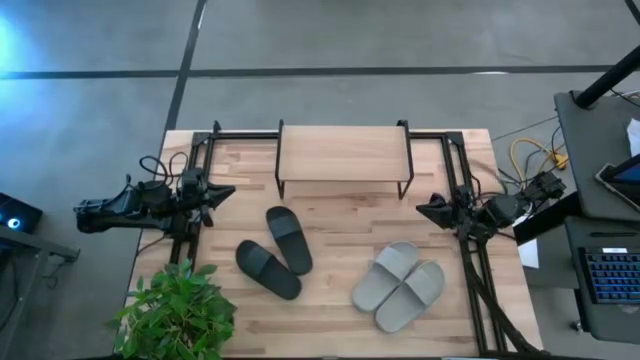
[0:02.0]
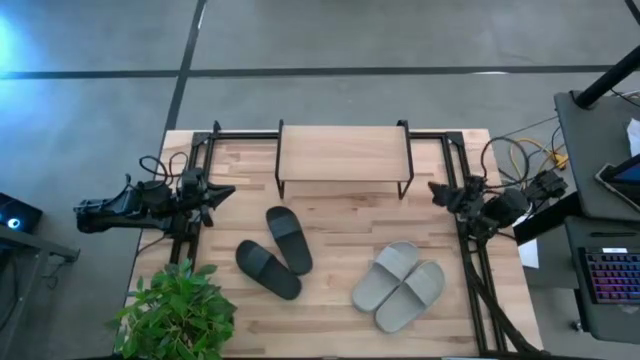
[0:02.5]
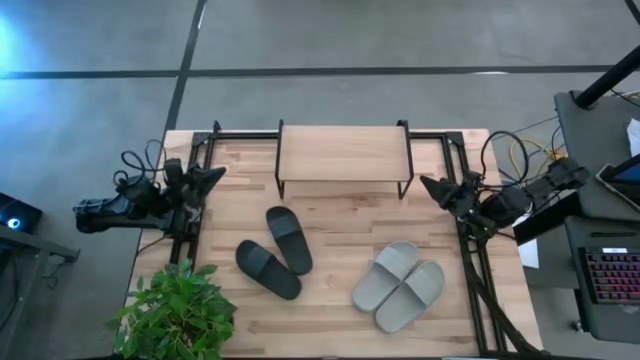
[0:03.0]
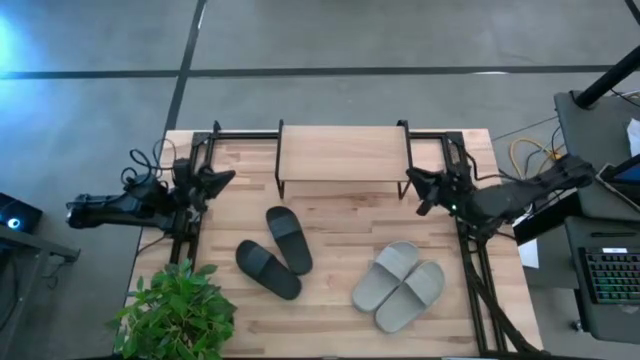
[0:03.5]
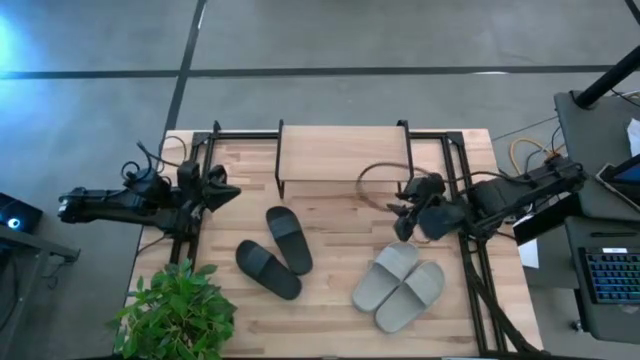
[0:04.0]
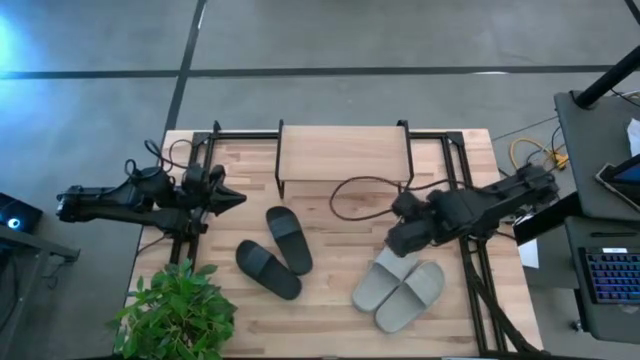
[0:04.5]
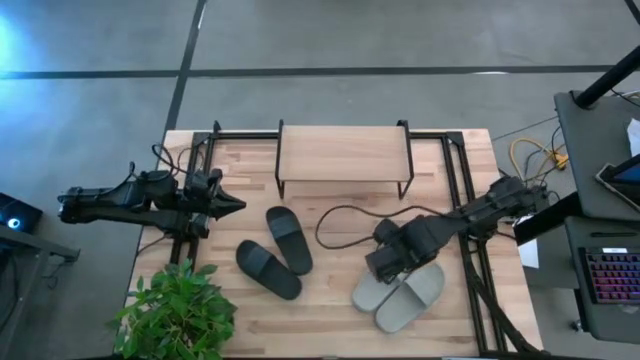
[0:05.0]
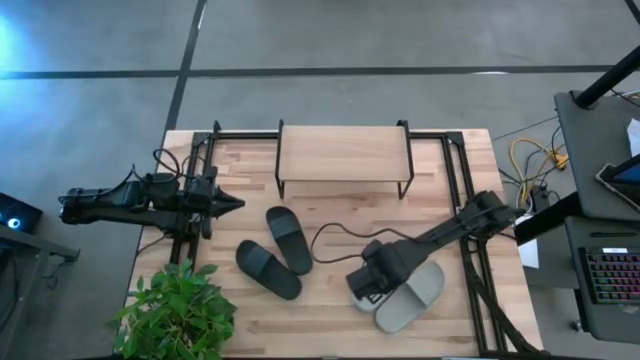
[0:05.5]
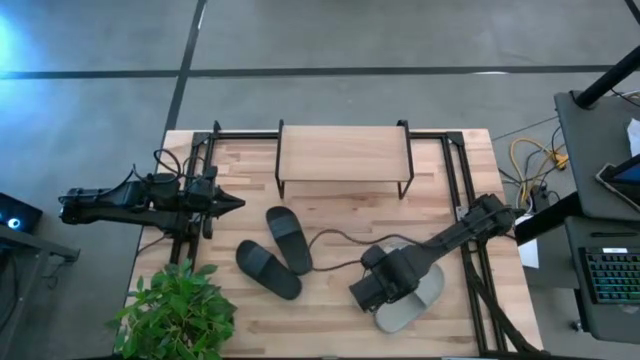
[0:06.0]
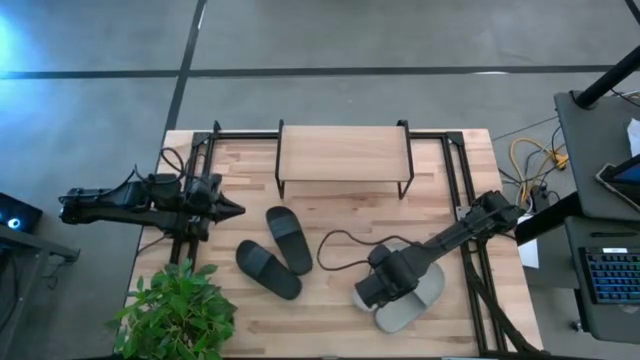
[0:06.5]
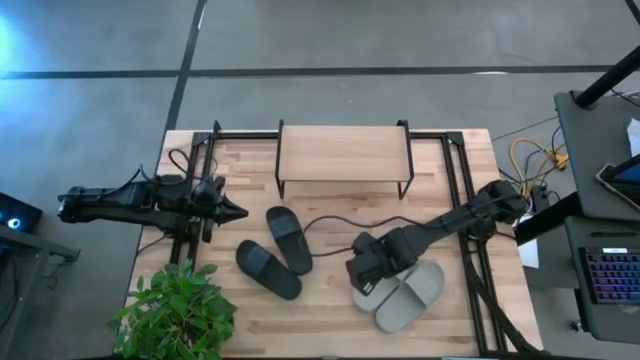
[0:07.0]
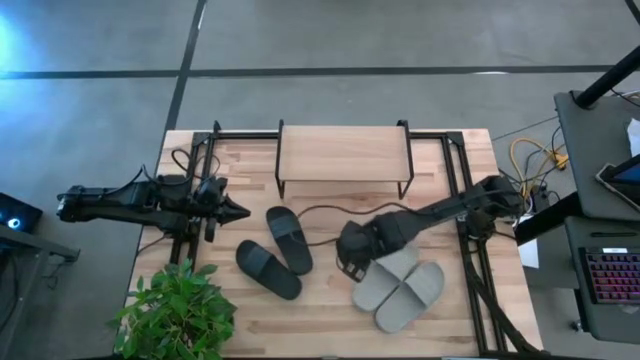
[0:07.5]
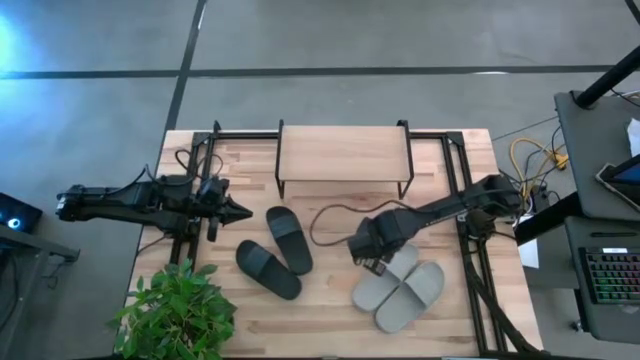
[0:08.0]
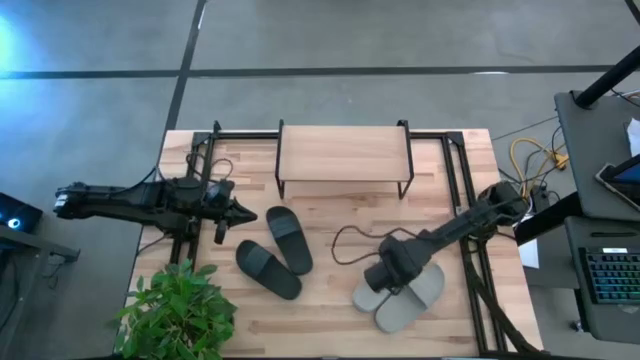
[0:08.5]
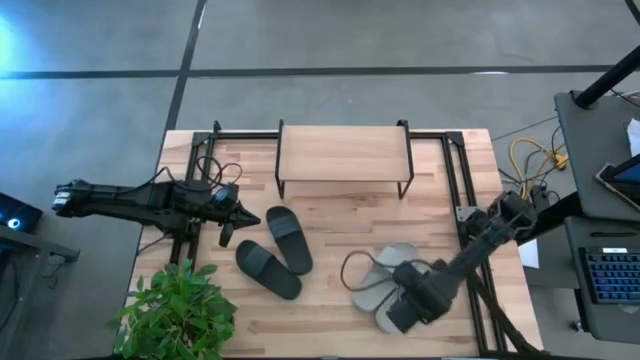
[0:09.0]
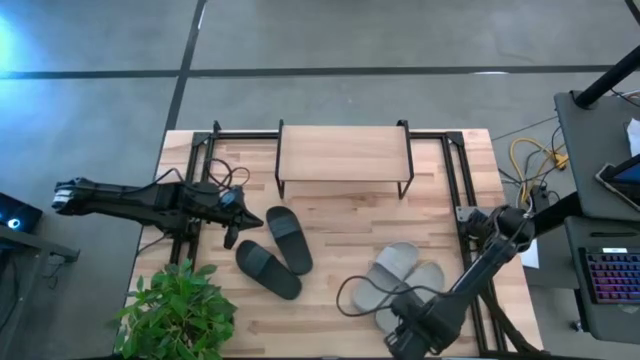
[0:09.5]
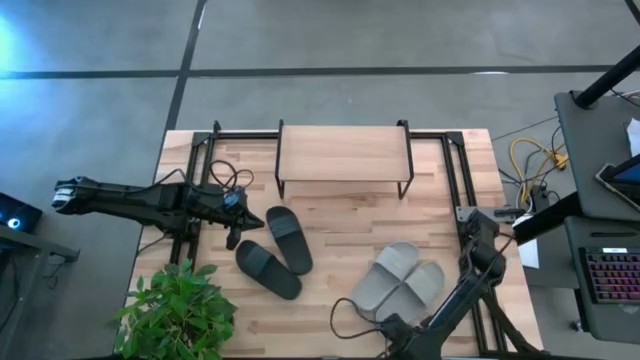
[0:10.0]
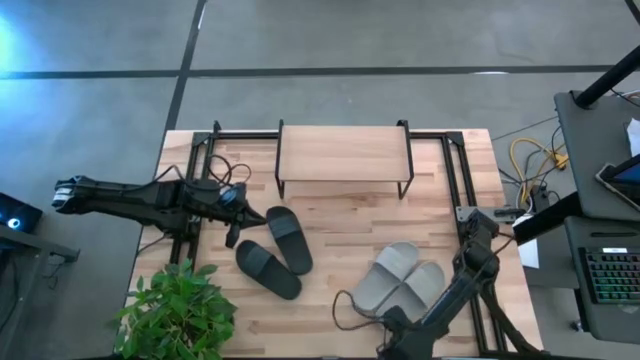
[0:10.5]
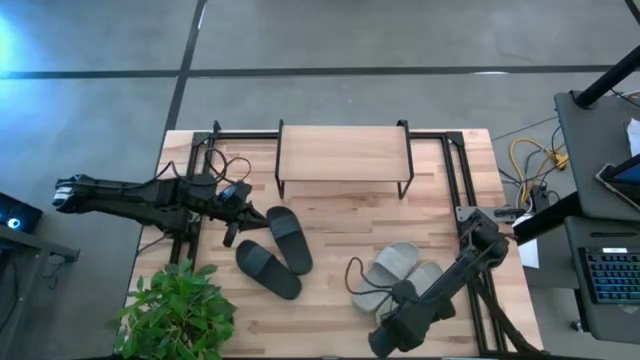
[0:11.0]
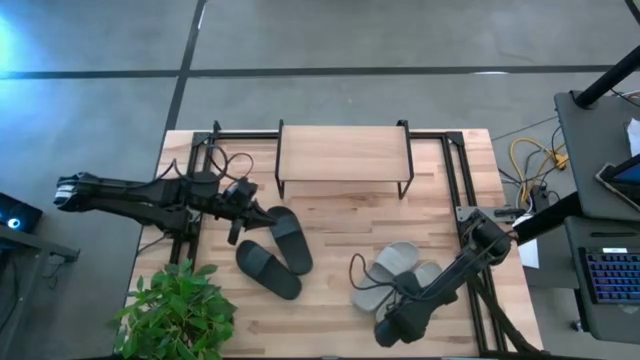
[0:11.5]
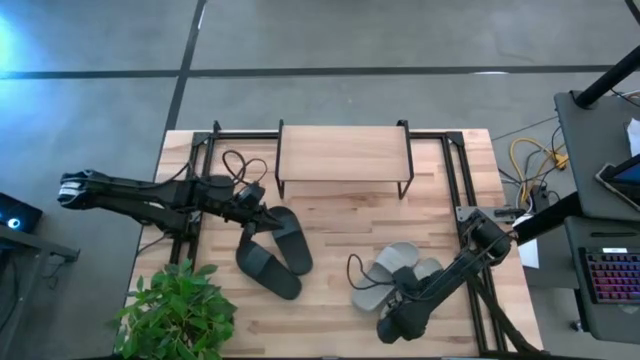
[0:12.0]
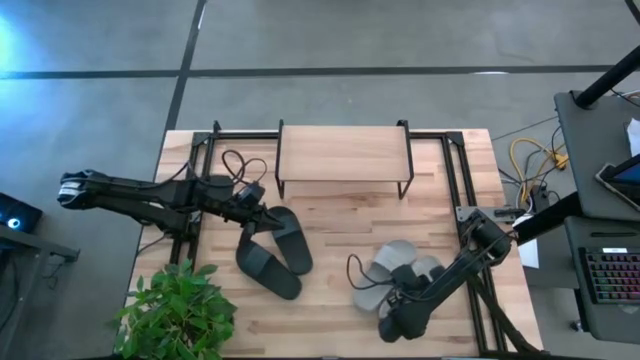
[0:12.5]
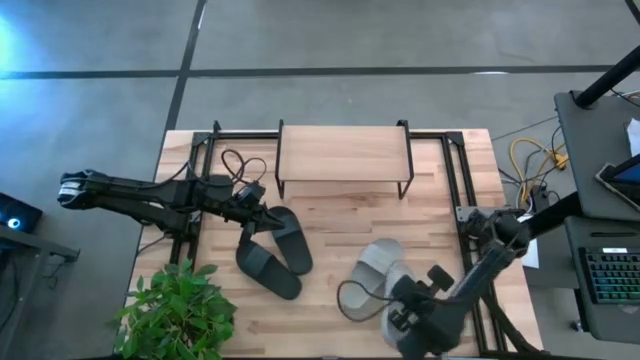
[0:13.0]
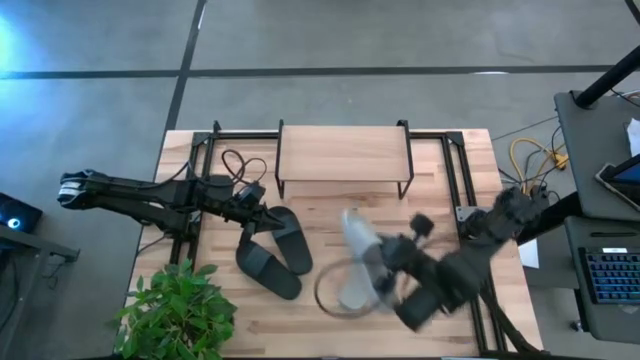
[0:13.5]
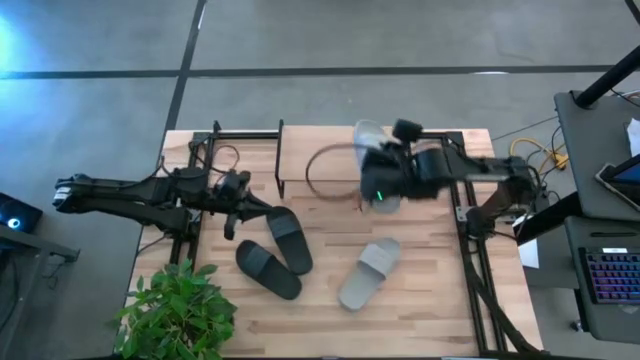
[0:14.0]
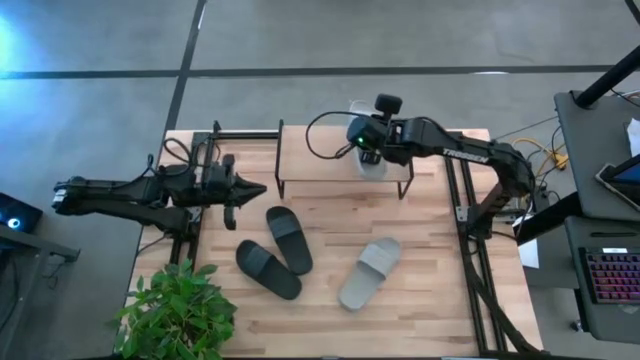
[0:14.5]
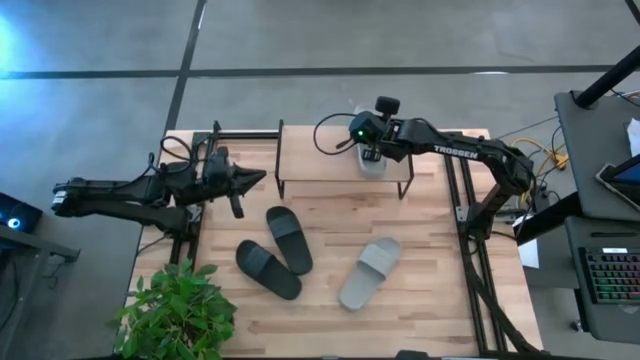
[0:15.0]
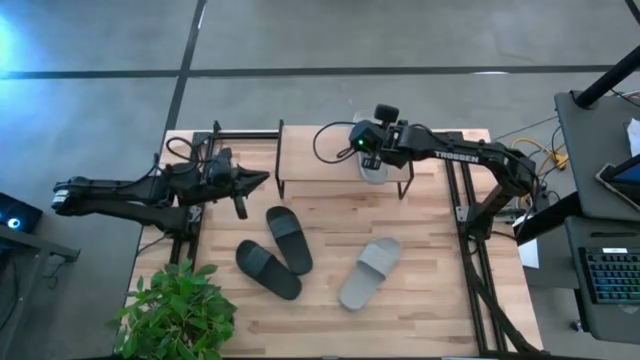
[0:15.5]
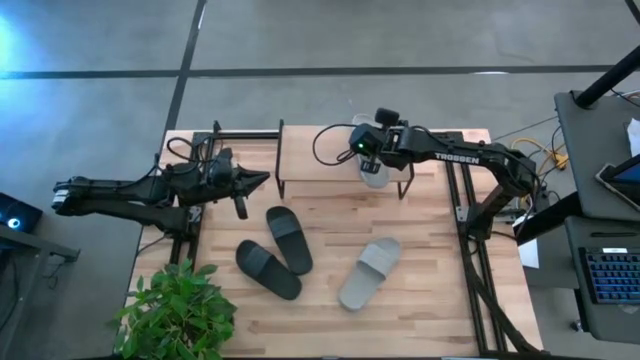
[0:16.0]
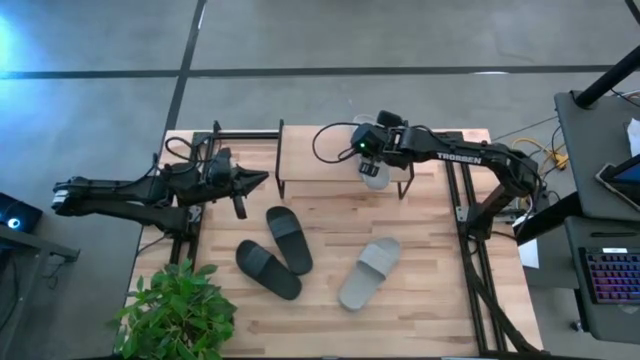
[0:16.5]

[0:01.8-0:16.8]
Task: Pick and place slides into the shelf
Put the right gray slide on the shelf

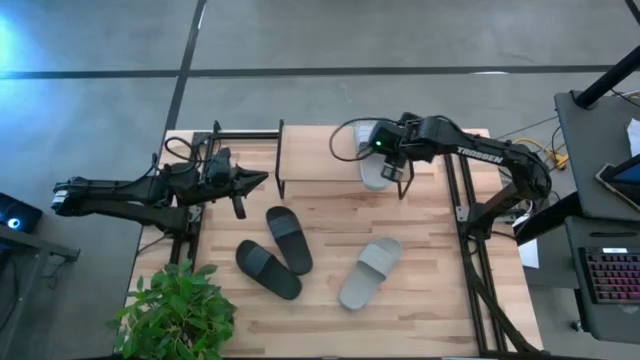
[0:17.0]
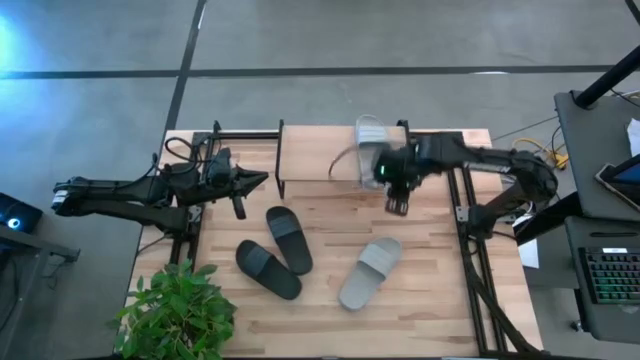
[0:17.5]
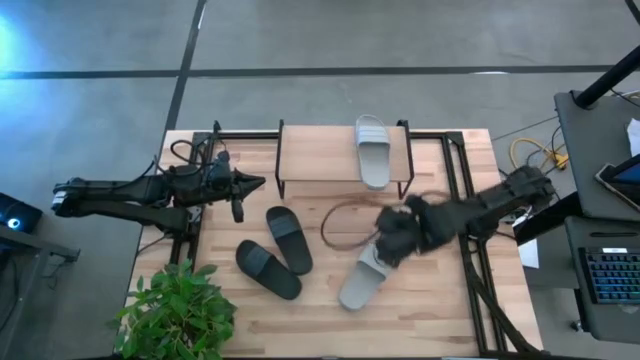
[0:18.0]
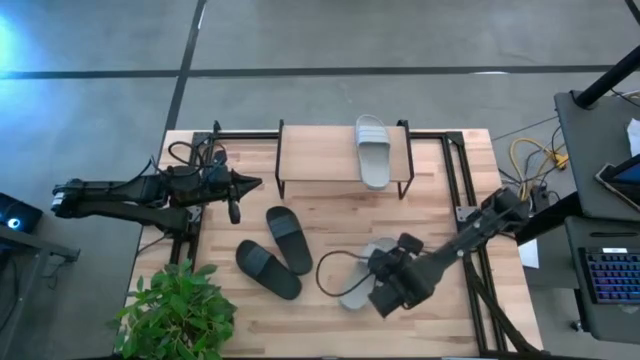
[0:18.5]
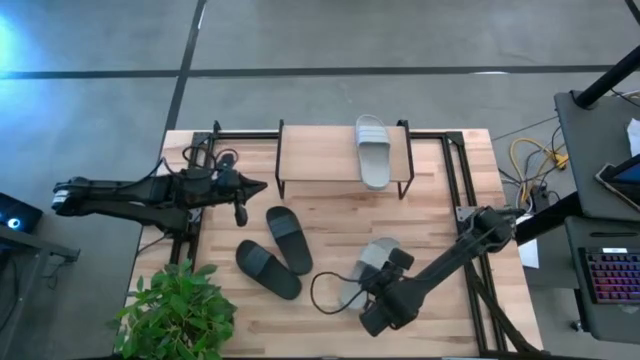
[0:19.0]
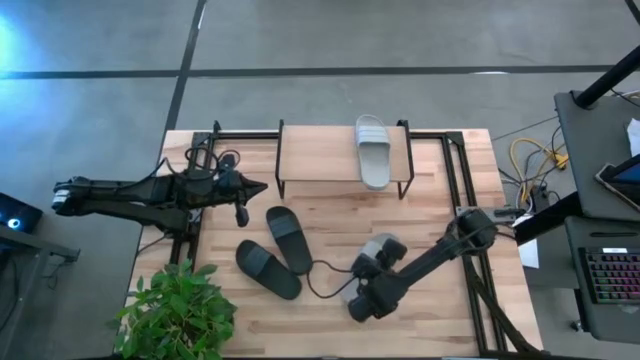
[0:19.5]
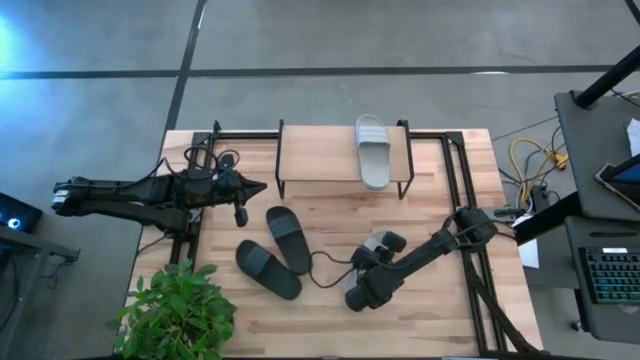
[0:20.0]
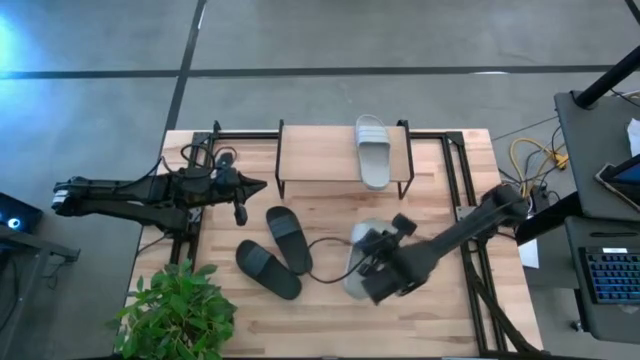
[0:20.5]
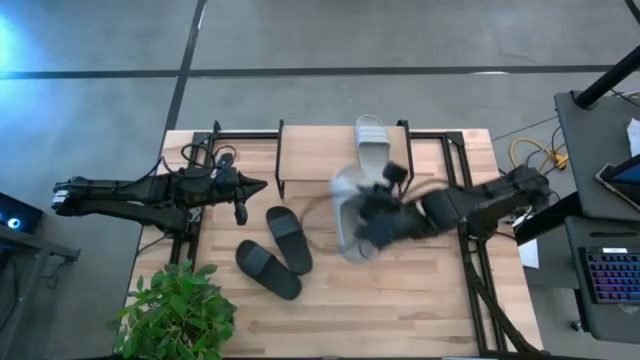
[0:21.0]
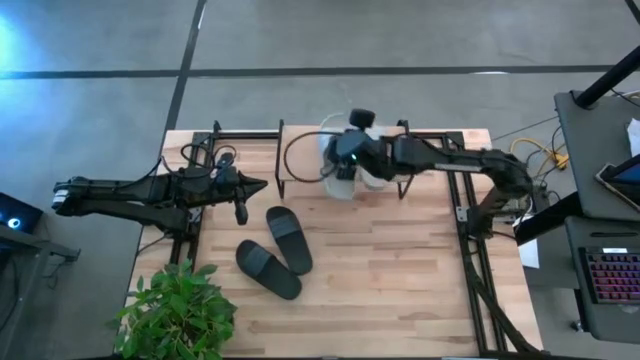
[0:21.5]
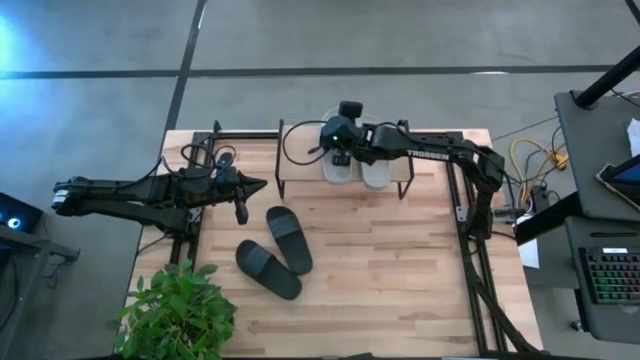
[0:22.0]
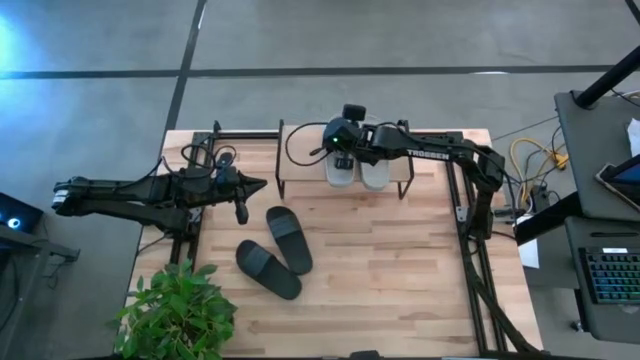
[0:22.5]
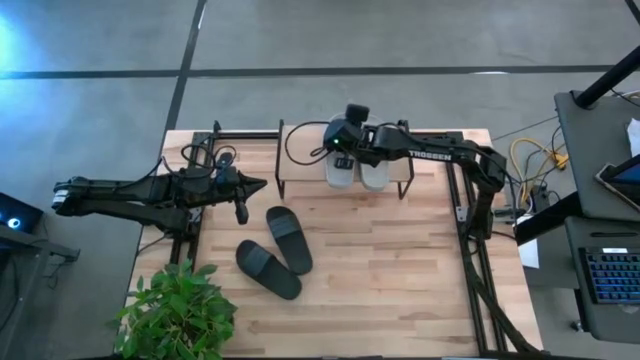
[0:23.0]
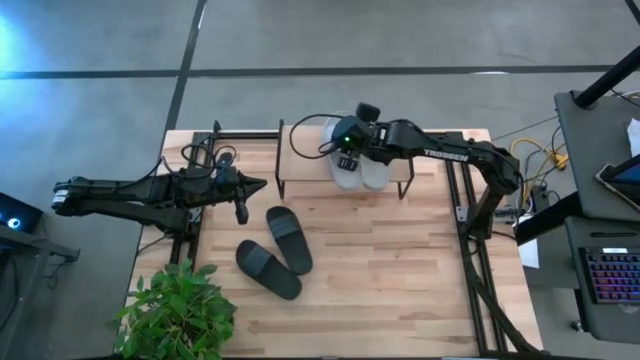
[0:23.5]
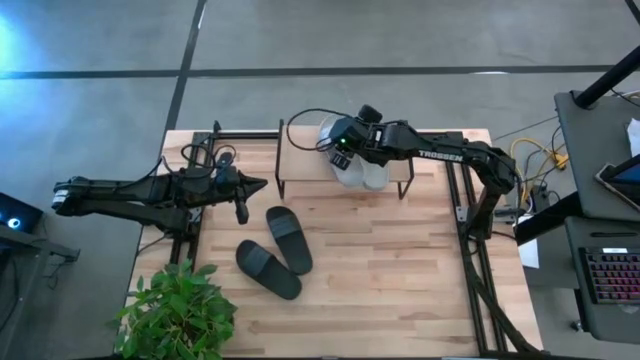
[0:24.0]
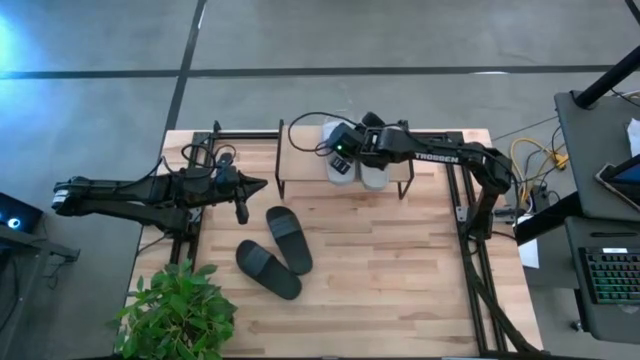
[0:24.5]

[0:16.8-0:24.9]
Put the gray slide on the shelf
